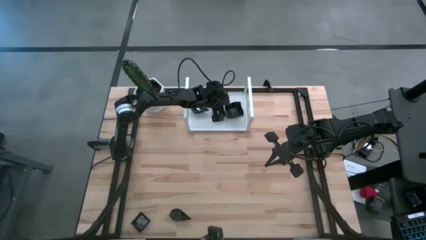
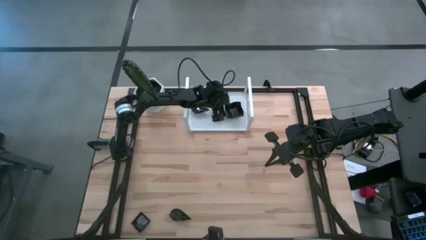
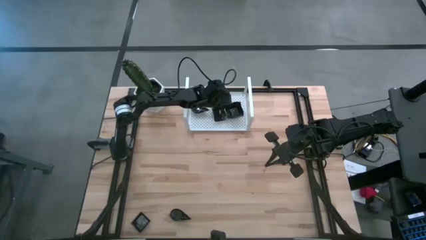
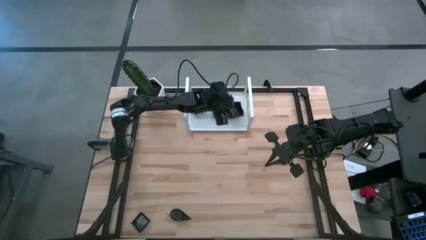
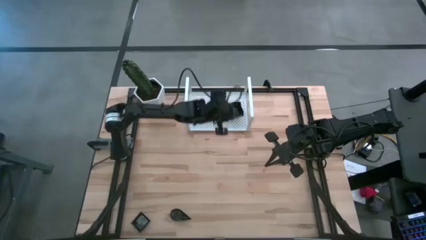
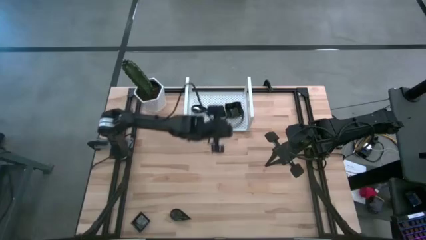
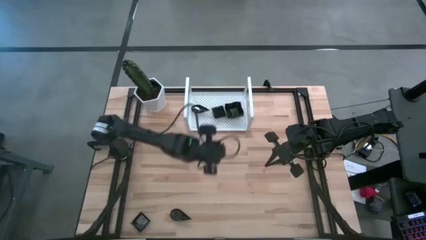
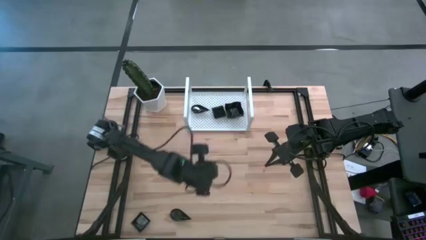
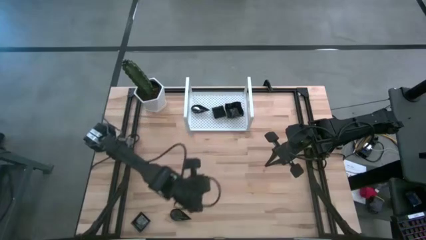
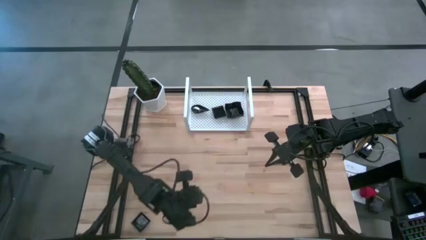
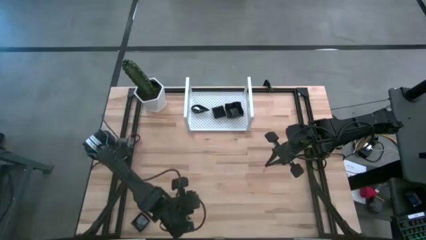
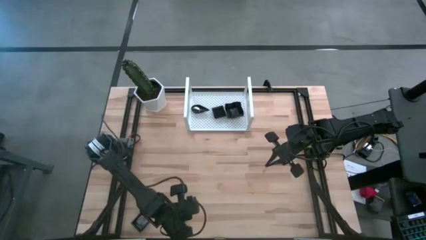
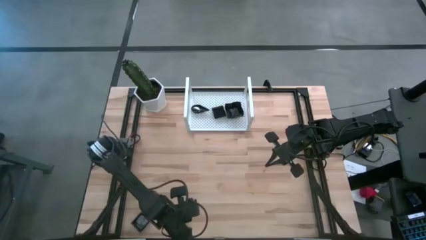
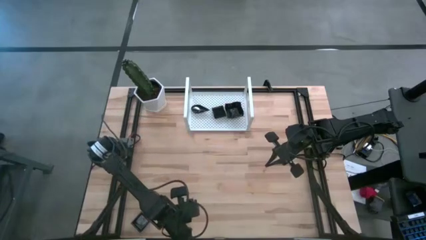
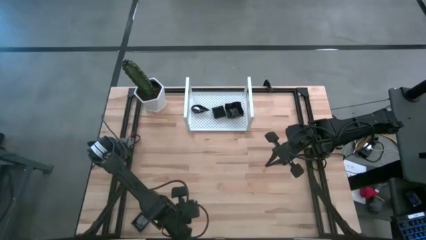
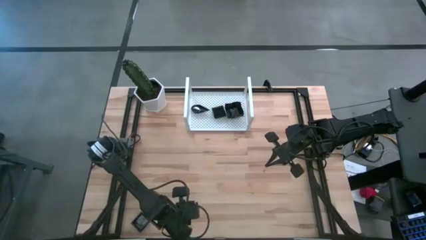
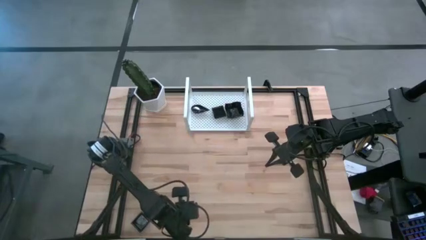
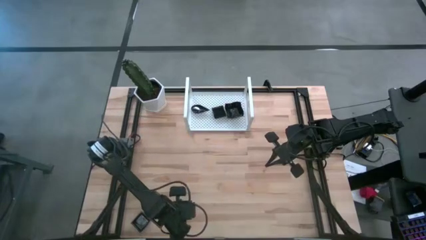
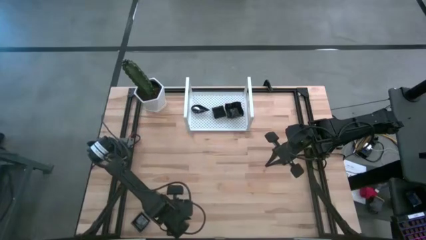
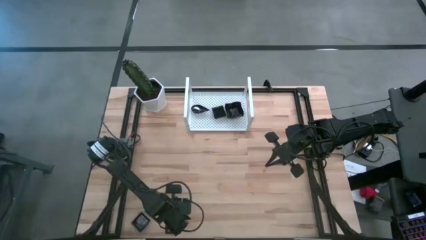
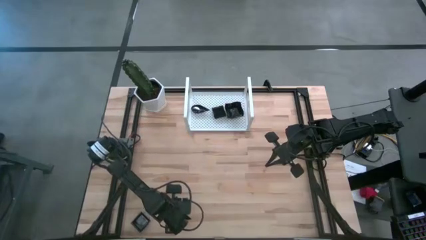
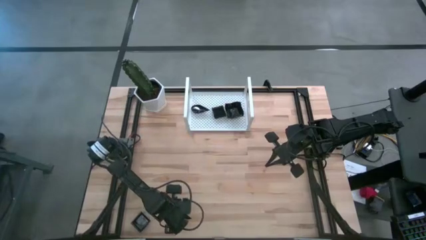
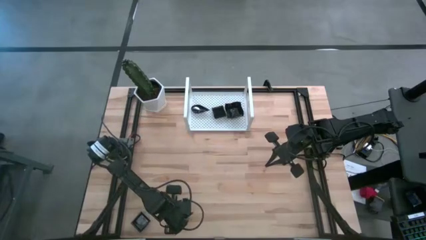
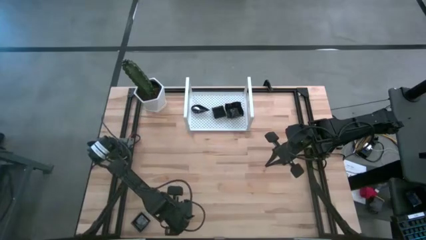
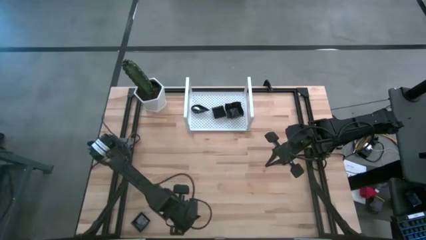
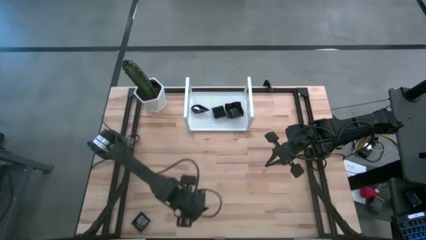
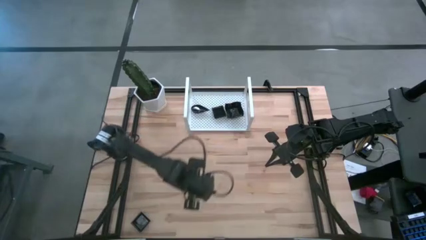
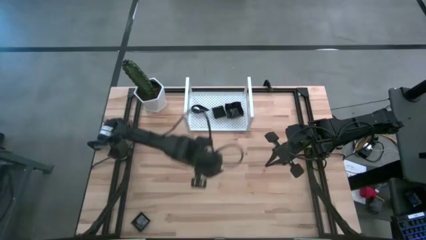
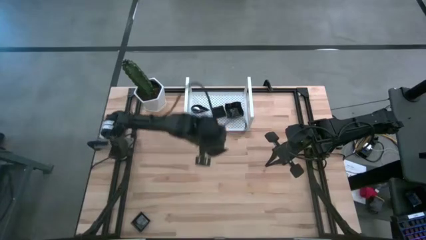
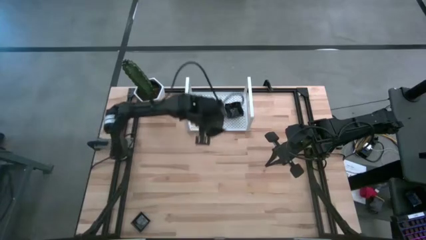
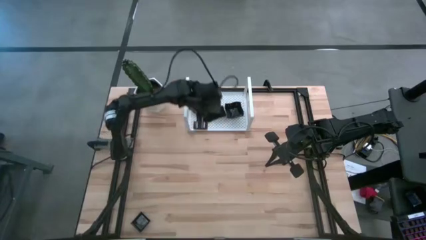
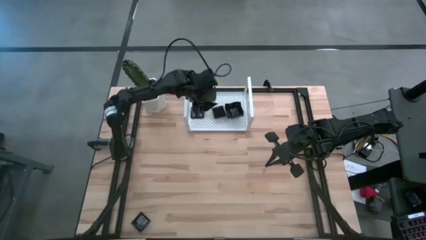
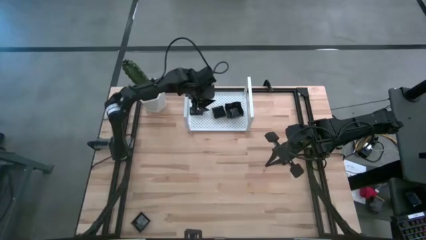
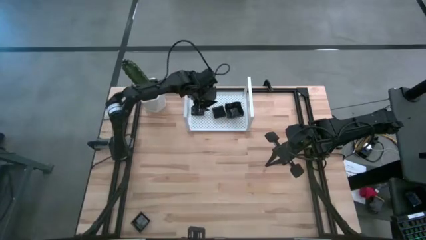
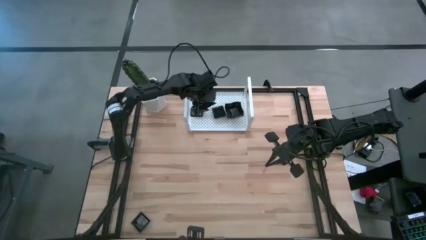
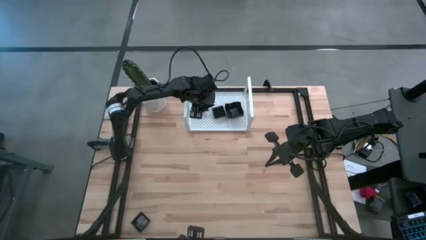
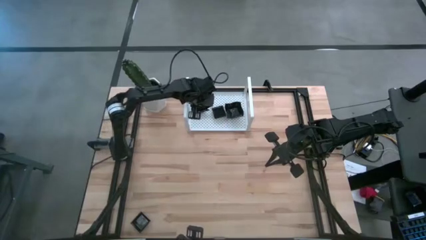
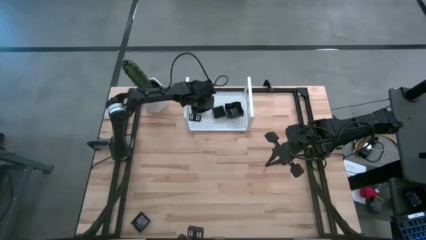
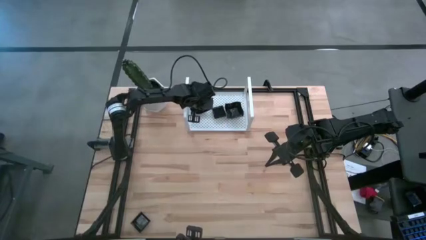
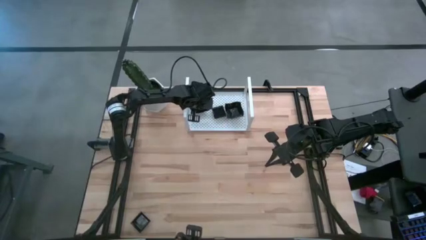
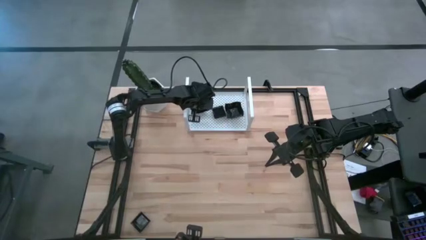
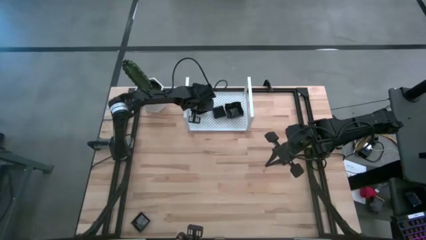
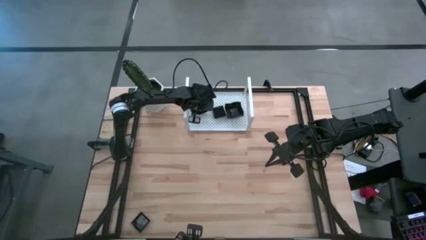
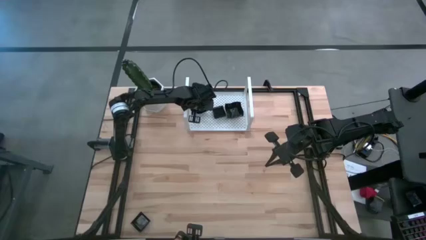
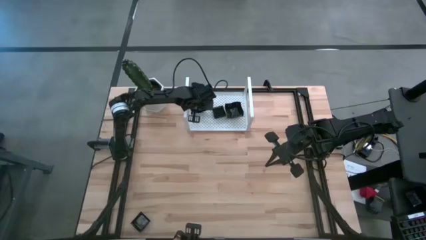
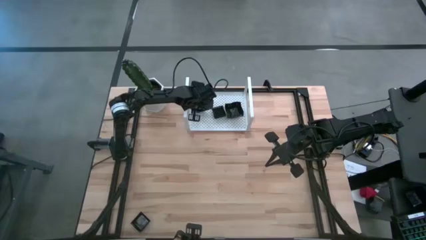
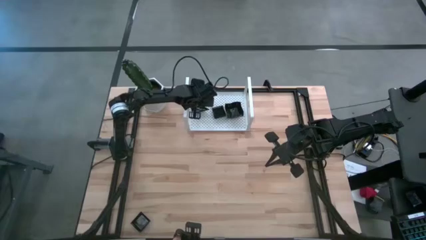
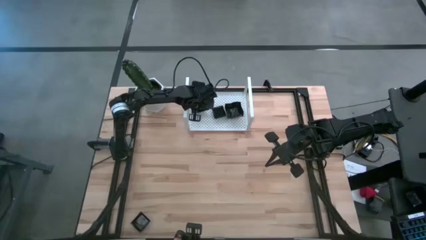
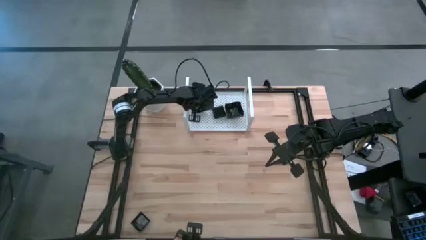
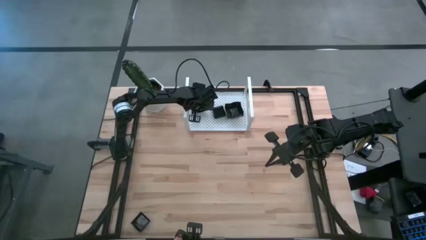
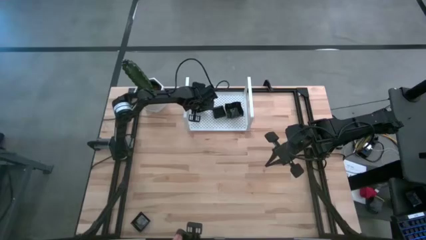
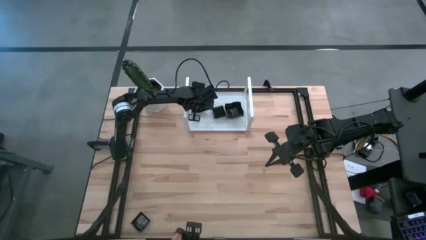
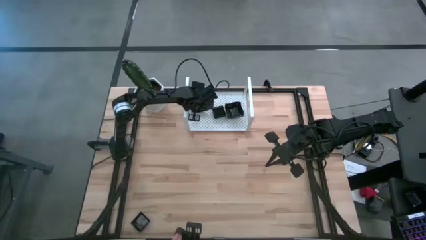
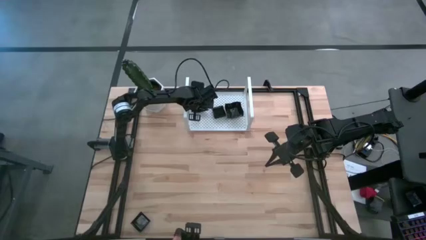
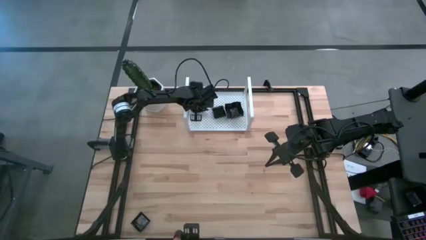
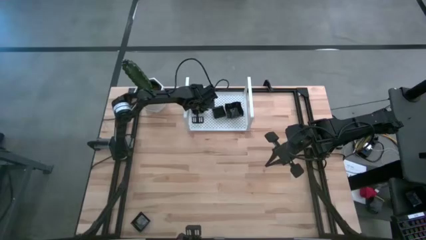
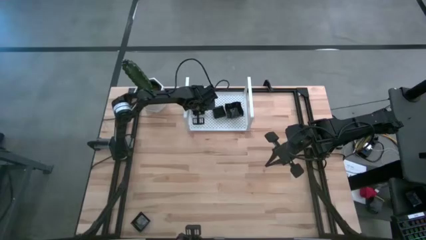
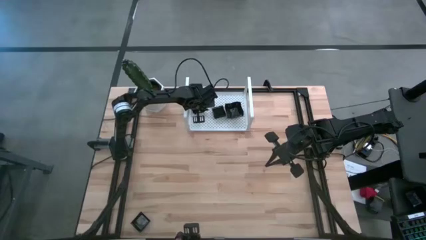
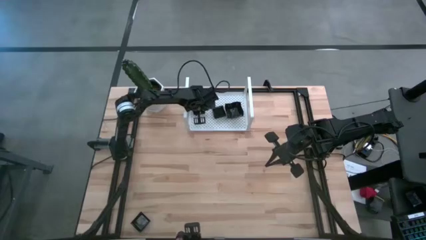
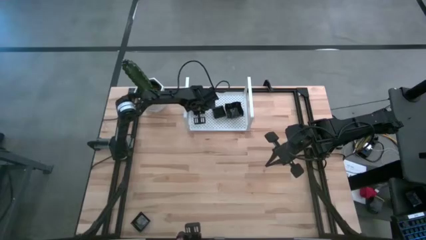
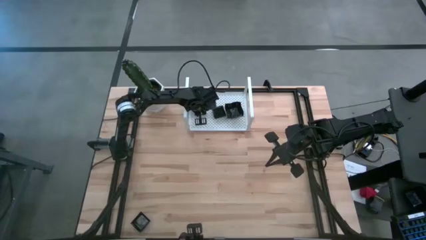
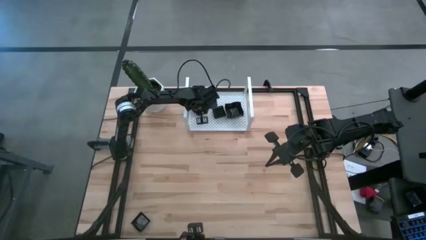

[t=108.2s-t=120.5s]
Task: Pick & Place Mini shaped plates
Stack the black drop-shaped plate on top of the black drop-shaped plate on the shelf

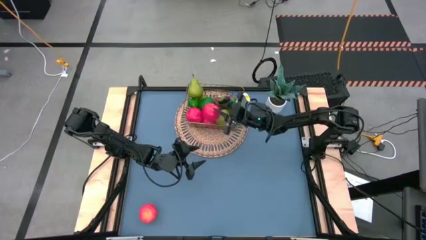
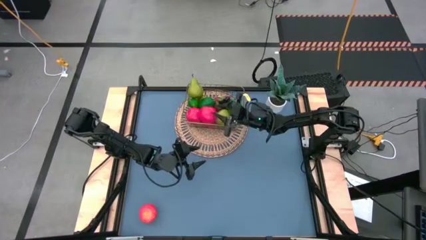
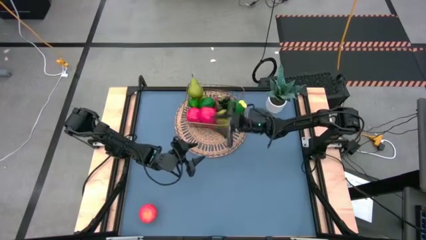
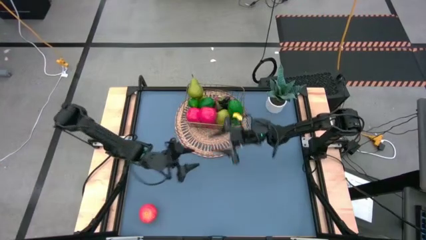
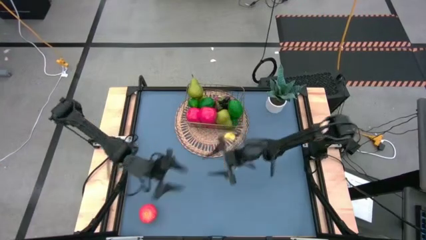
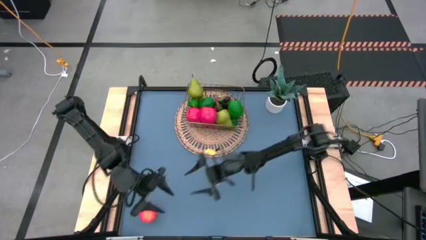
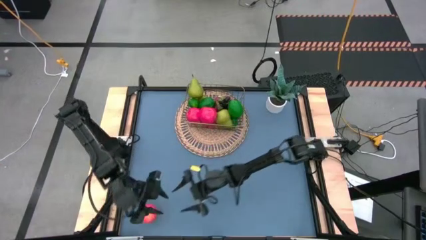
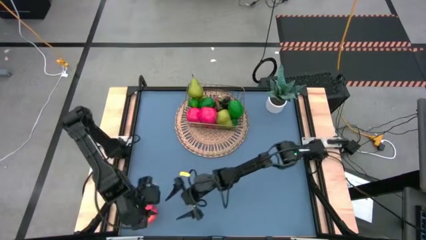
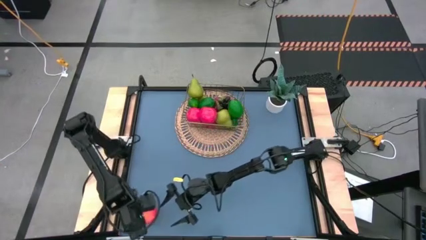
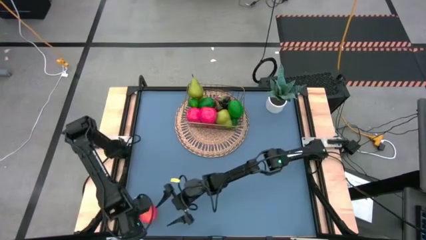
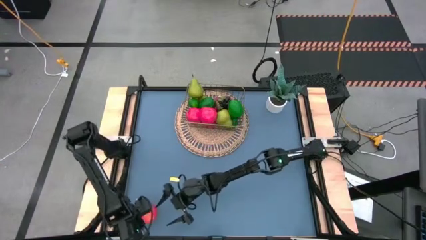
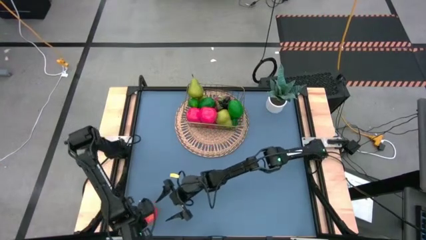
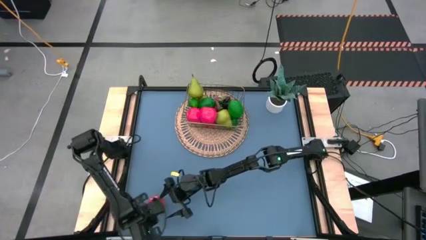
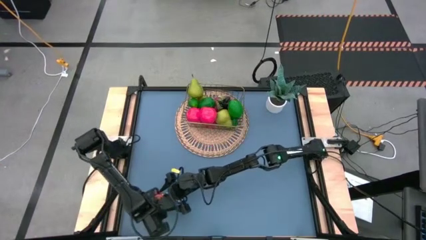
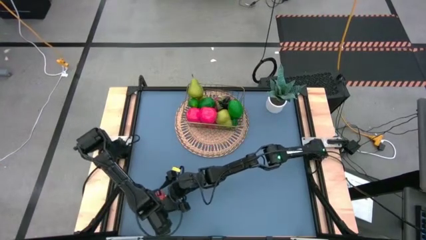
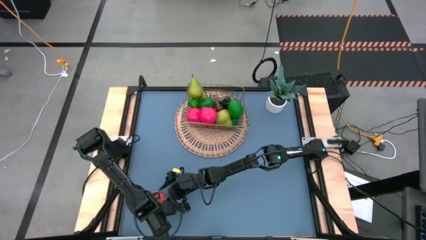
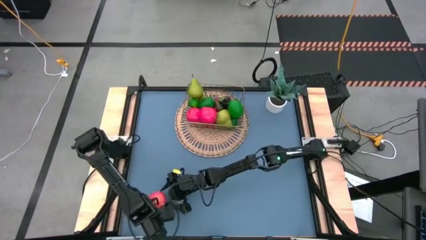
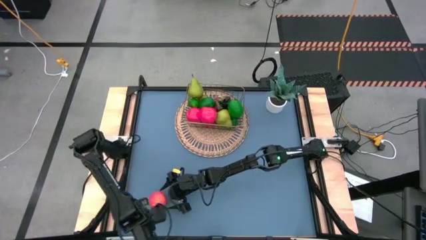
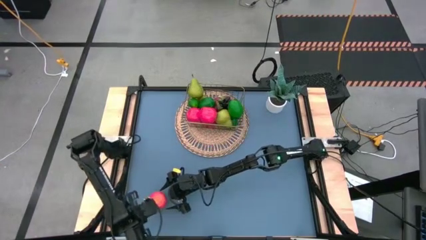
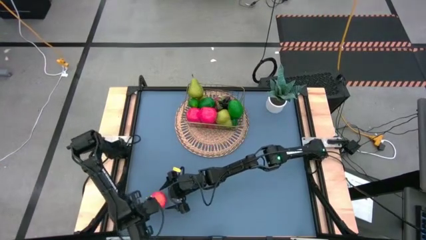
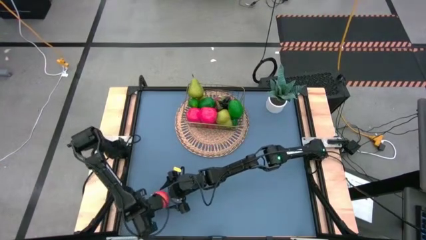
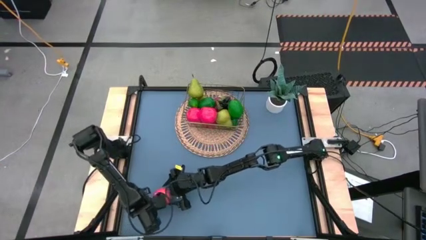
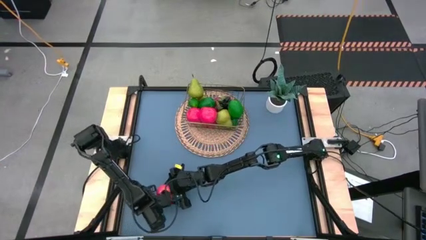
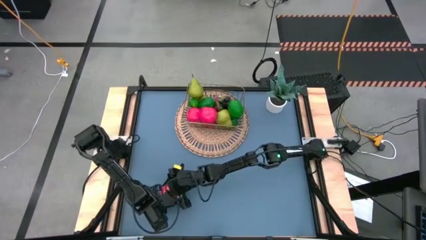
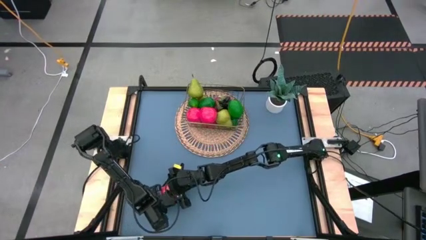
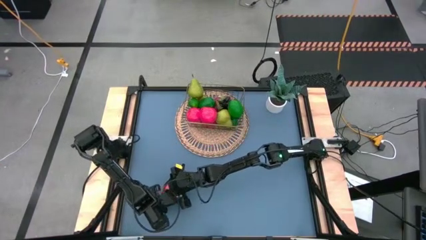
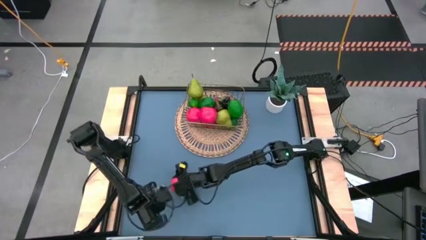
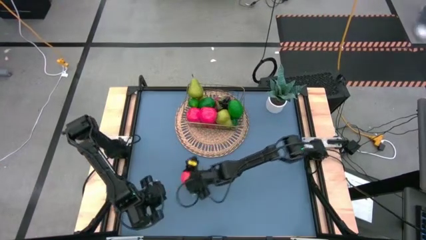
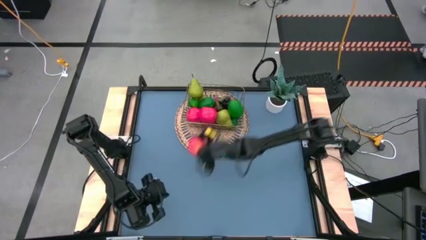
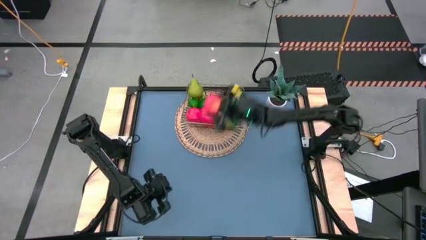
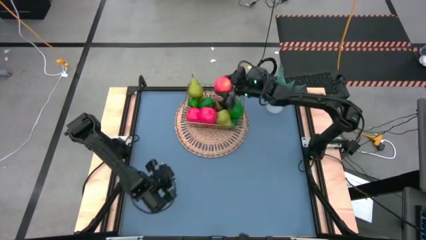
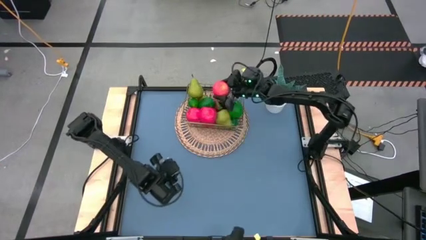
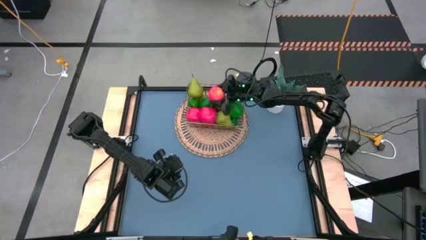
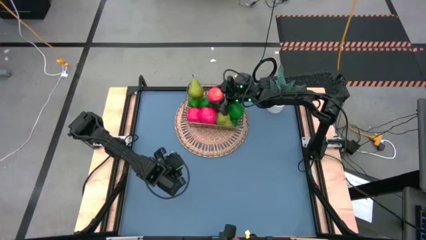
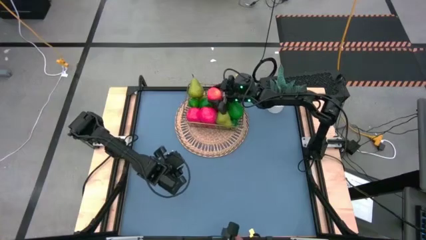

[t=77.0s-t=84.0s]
Task: Build produce basket
Put the red apple into the gold wire basket
